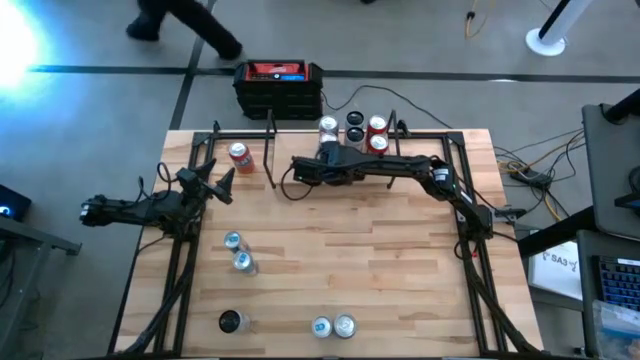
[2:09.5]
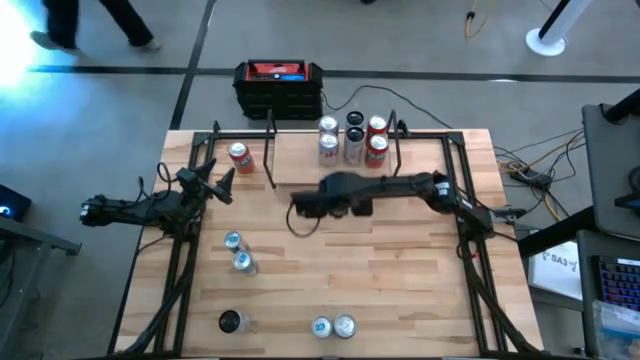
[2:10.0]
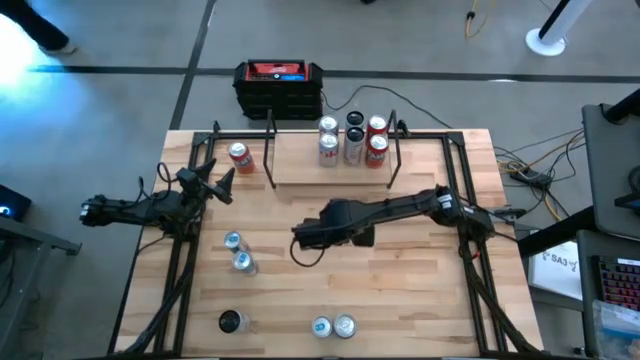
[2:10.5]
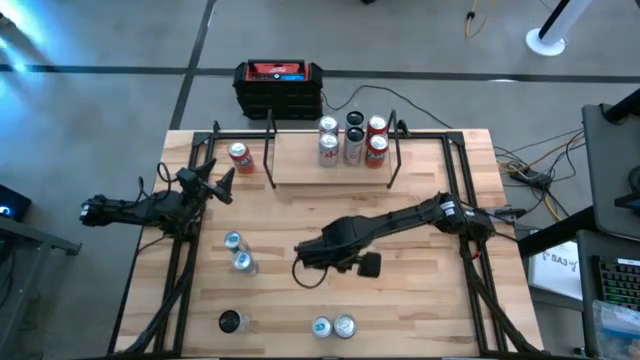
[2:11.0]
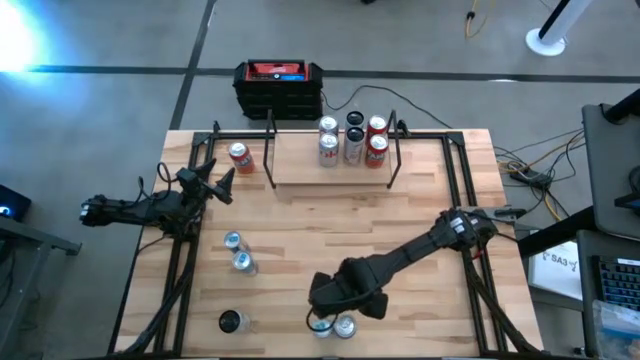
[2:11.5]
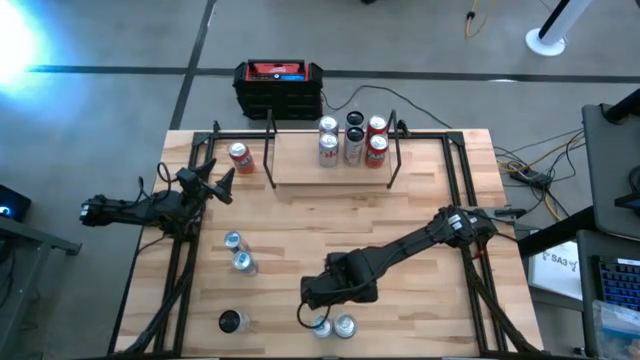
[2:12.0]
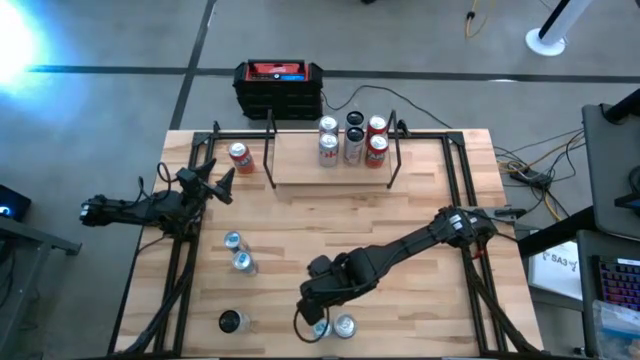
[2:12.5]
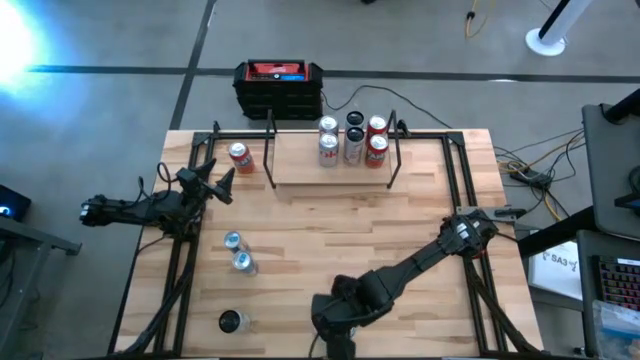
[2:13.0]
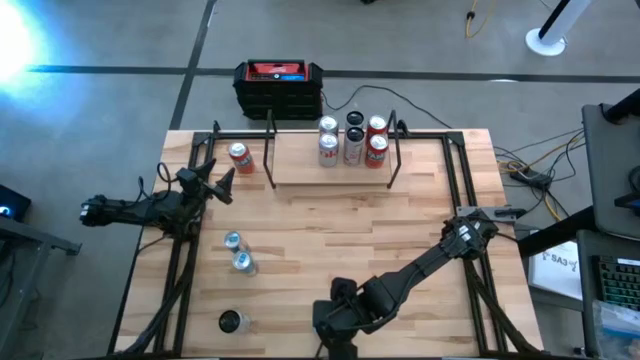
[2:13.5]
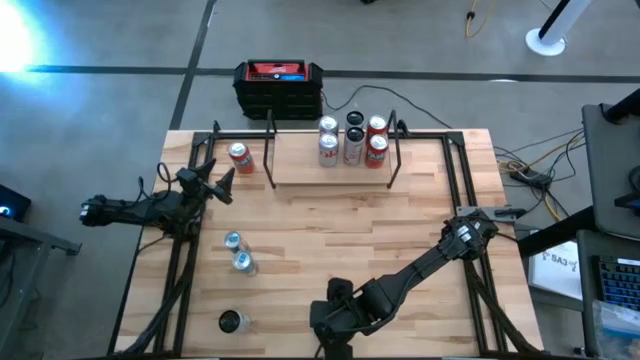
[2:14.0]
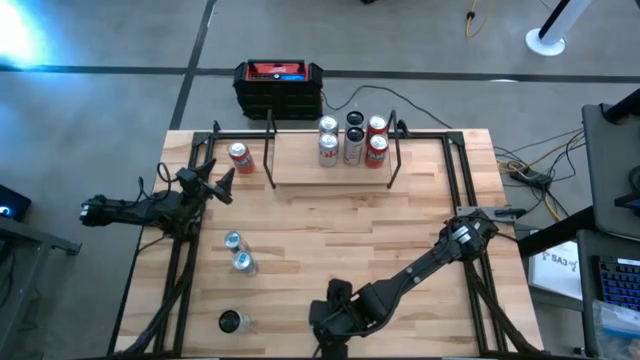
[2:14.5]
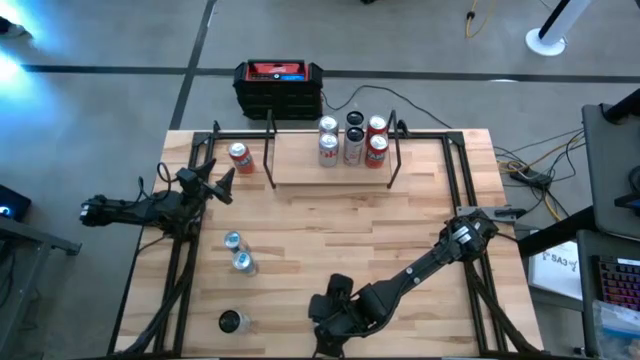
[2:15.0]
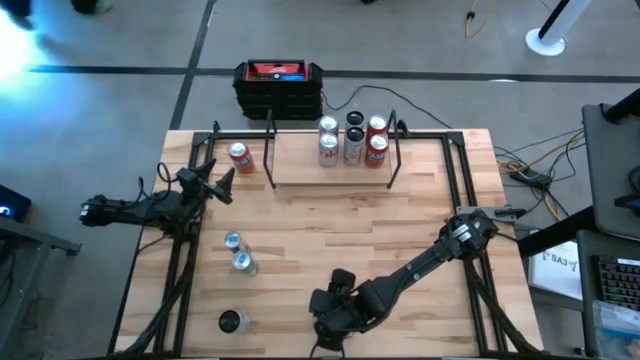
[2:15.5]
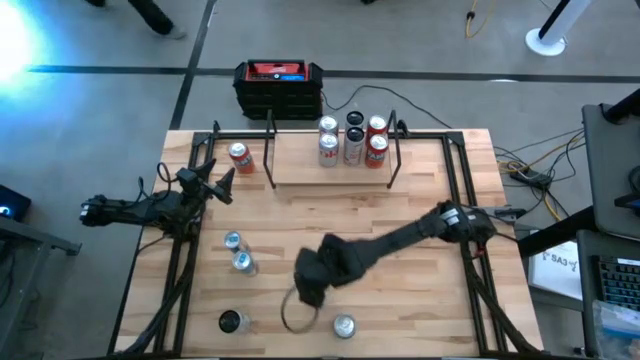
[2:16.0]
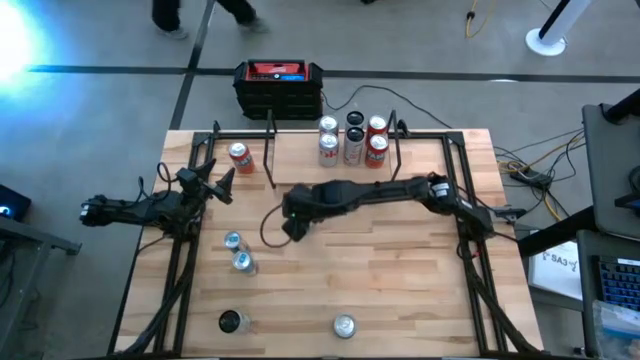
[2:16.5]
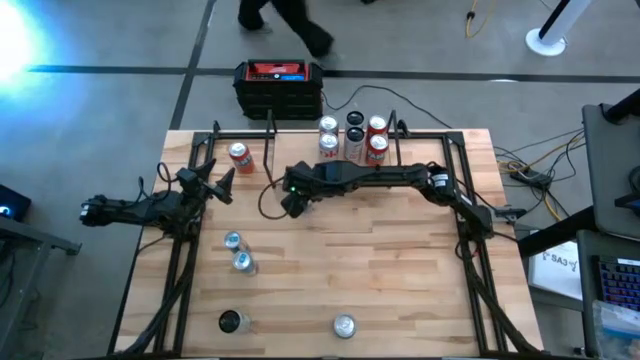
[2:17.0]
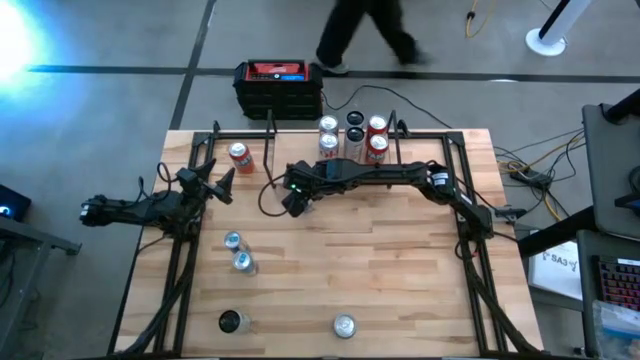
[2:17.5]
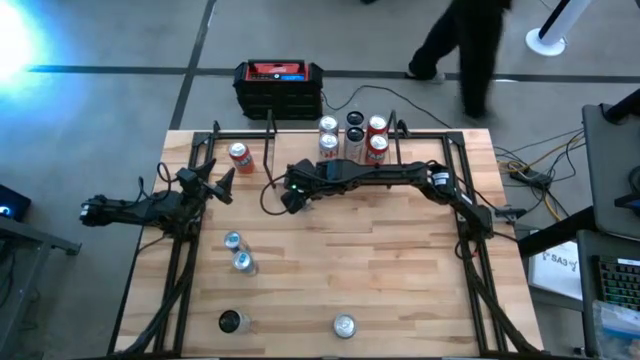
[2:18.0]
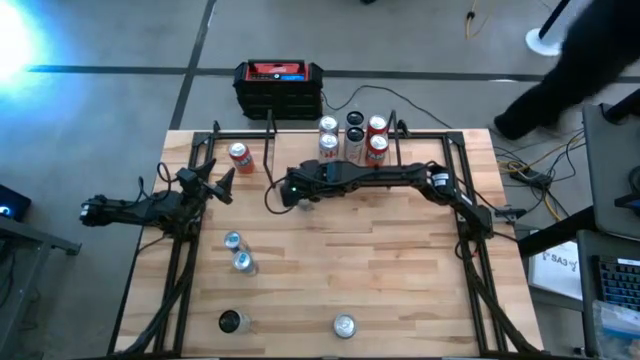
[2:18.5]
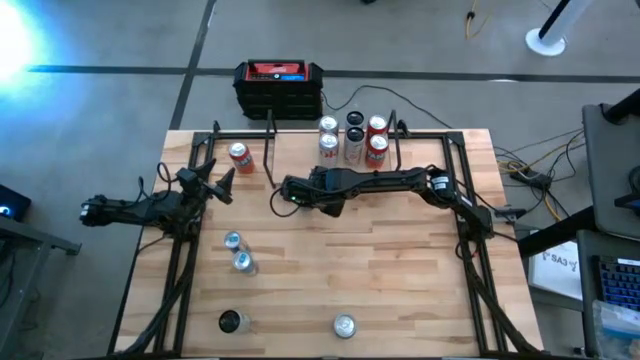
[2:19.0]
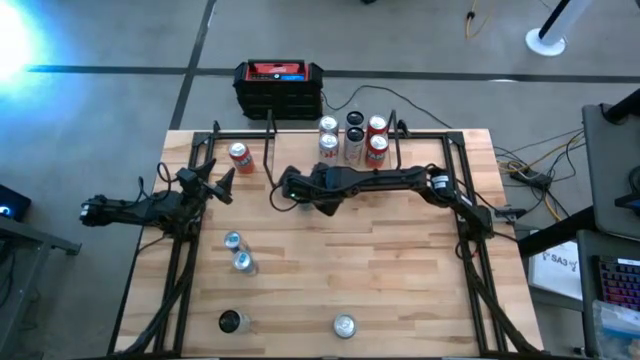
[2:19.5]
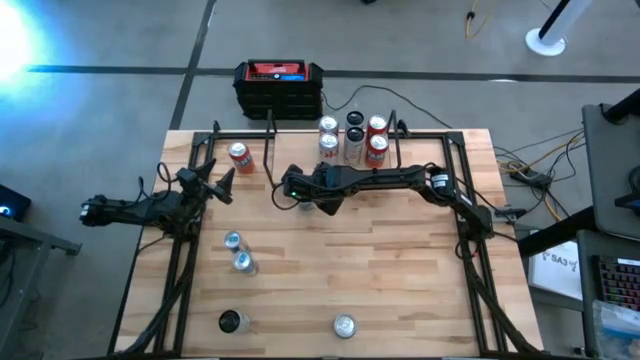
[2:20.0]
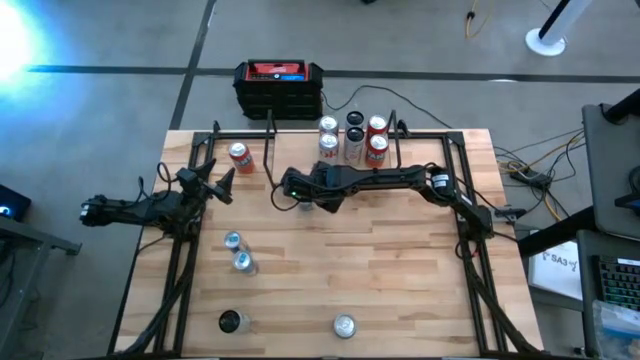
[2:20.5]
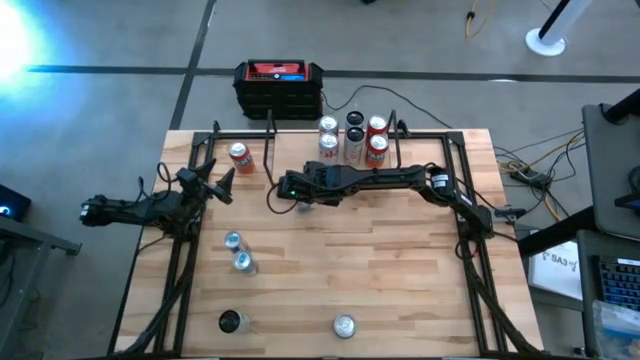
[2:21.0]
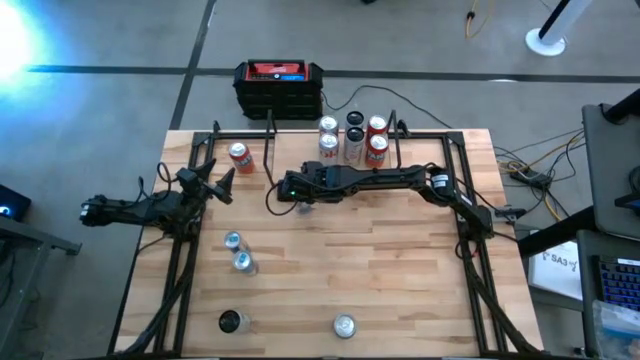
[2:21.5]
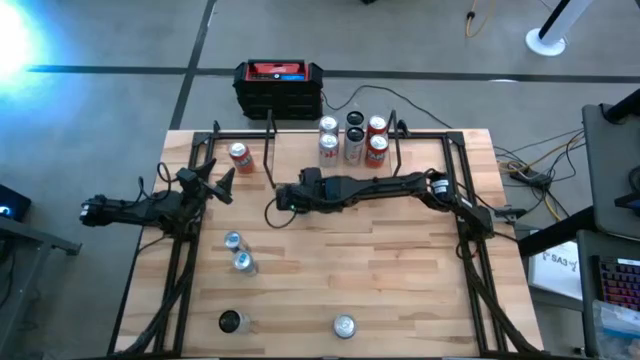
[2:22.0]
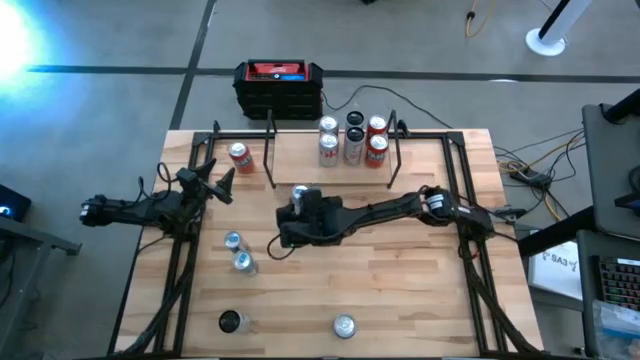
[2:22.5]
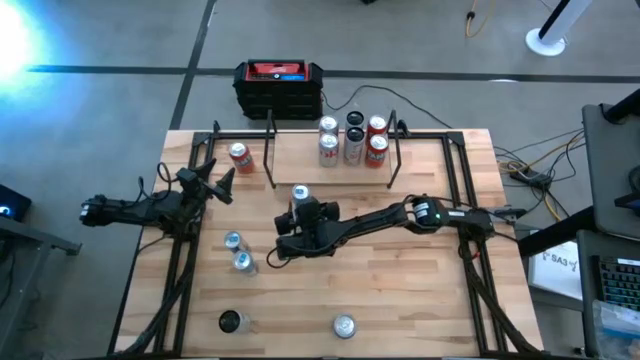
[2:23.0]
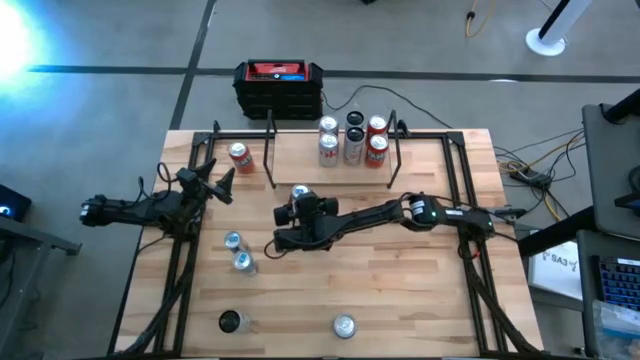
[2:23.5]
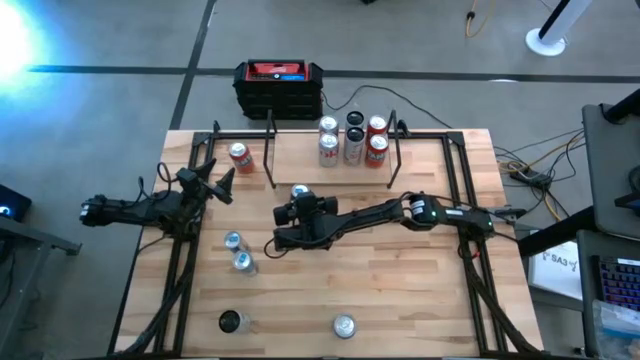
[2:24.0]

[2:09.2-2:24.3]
Task: Place canned beverage on shelf
Put the bottom blue soda can on the shelf

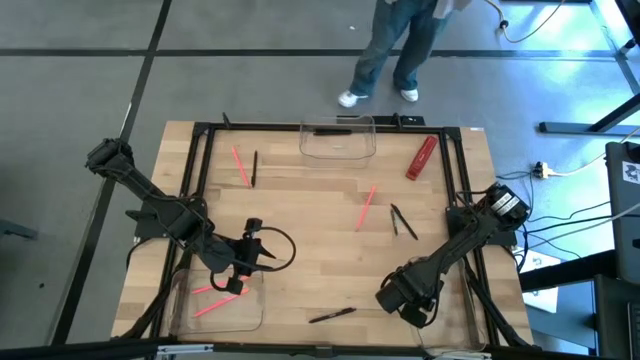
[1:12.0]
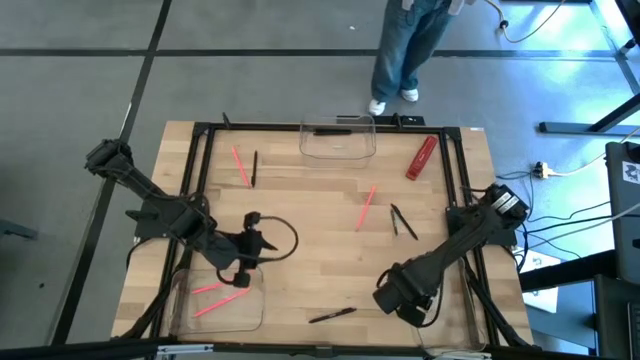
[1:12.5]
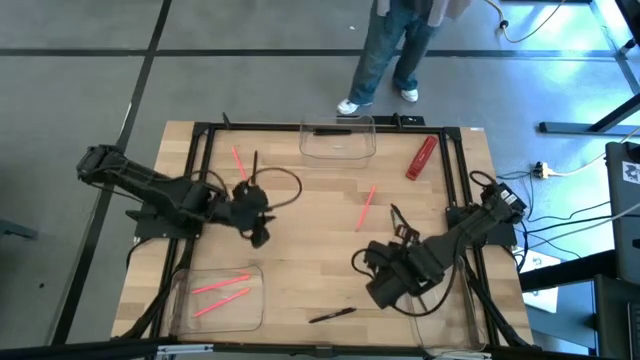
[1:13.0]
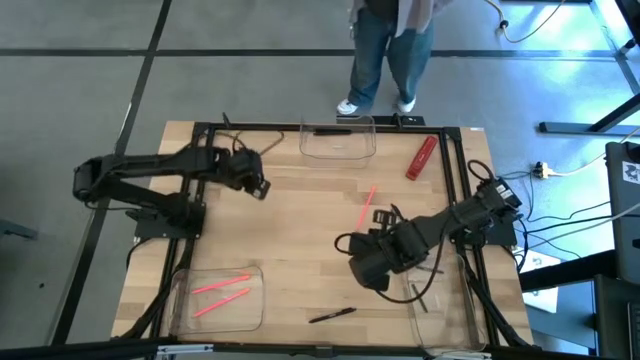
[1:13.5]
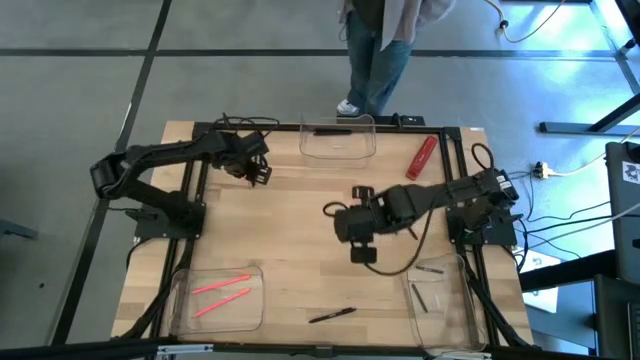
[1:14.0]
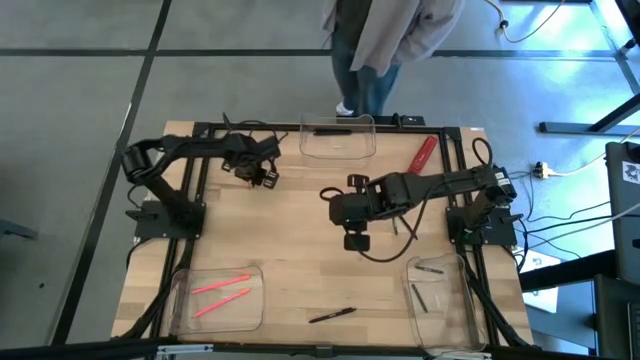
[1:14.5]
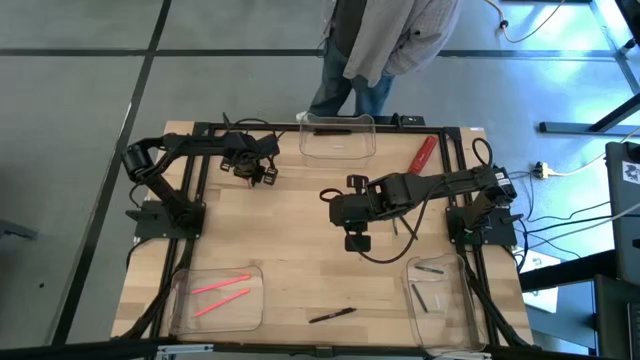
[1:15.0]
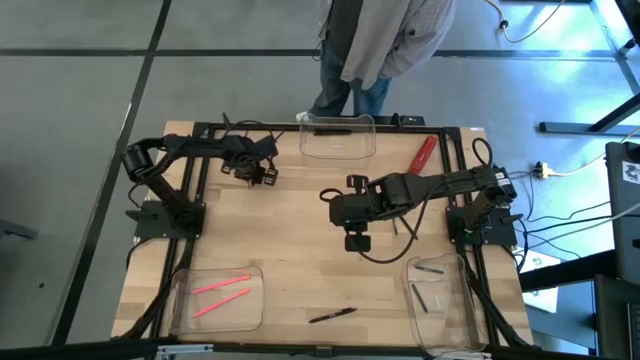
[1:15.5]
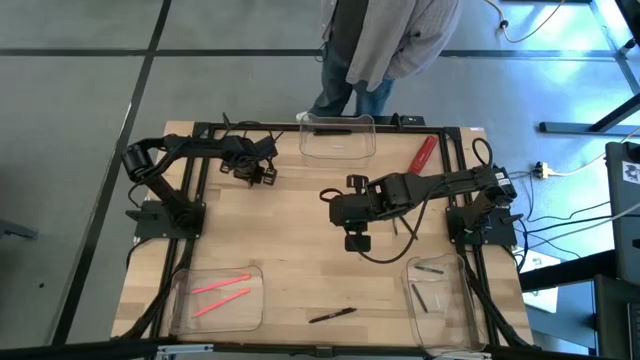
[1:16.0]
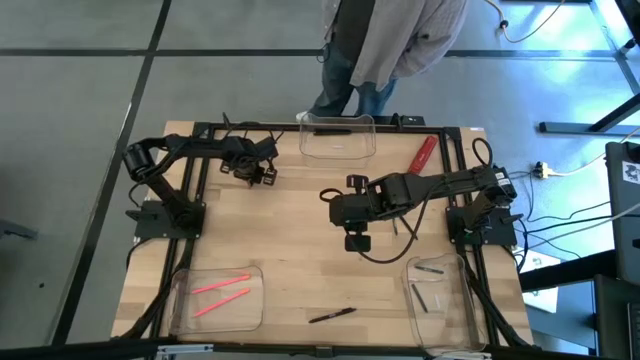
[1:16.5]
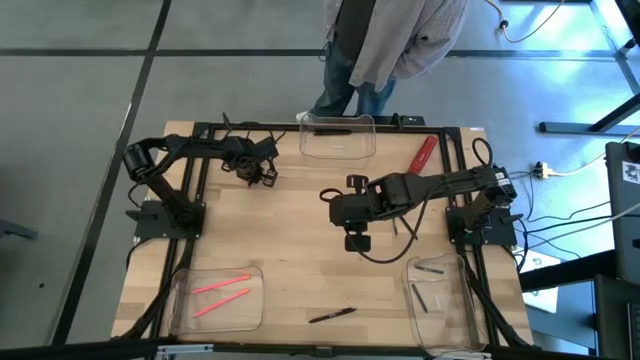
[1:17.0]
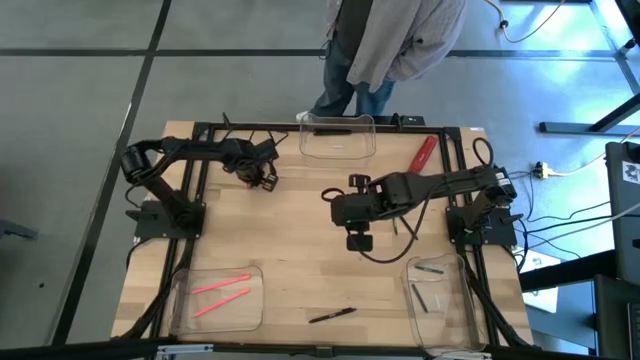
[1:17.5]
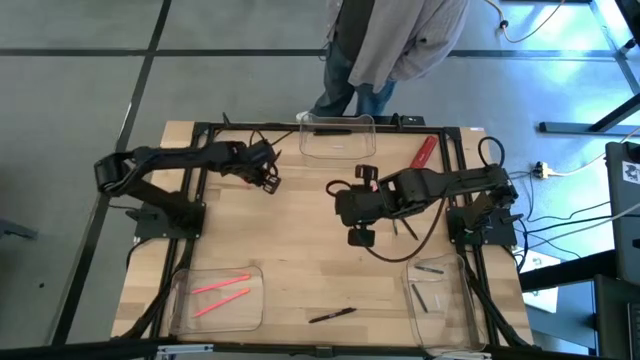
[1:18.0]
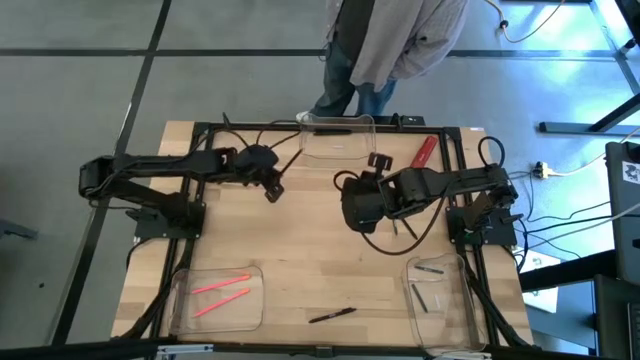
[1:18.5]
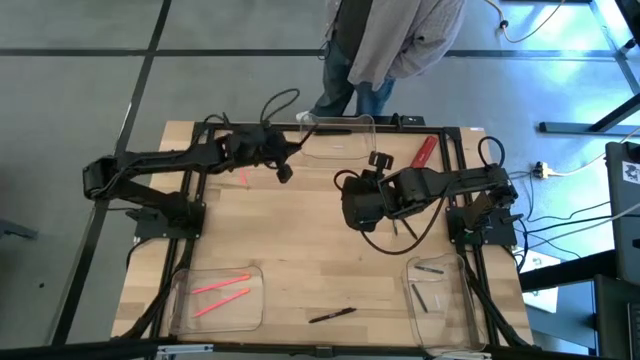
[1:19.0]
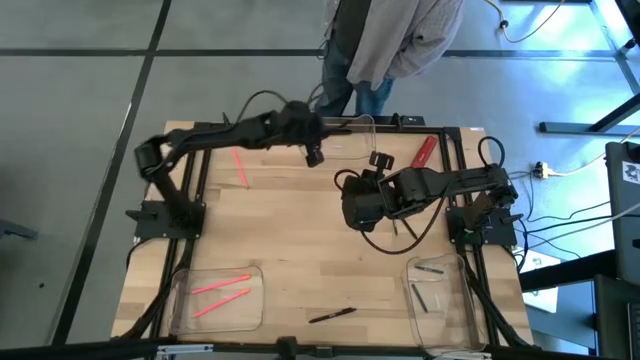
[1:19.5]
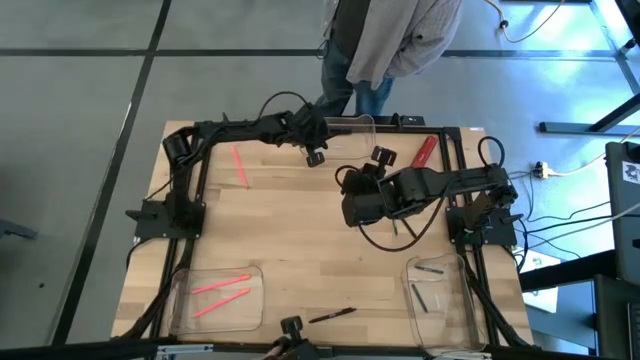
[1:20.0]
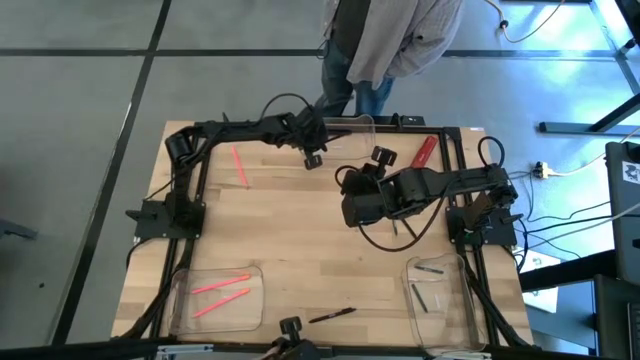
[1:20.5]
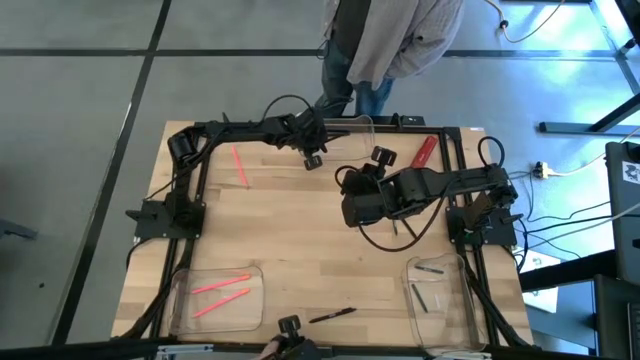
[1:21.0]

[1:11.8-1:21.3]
Task: Sort crayons/erasers/pens/pencils in bins
Put the black pen into the top transparent bin
